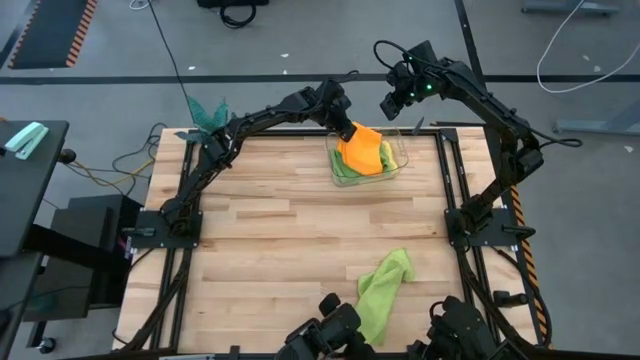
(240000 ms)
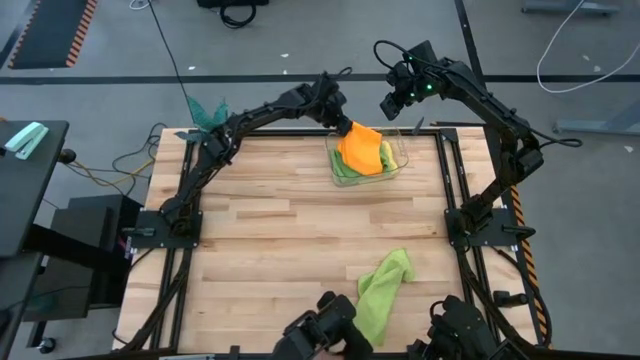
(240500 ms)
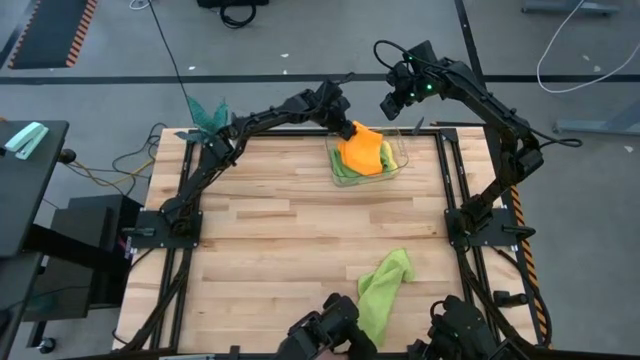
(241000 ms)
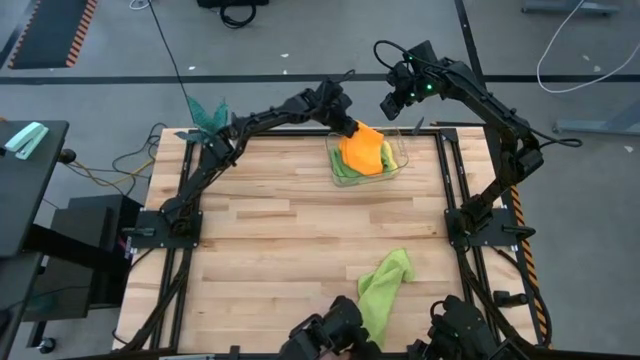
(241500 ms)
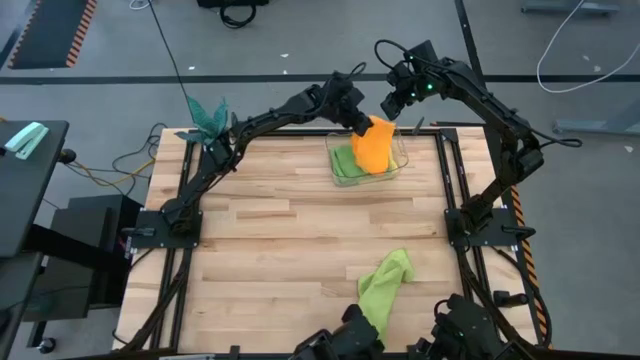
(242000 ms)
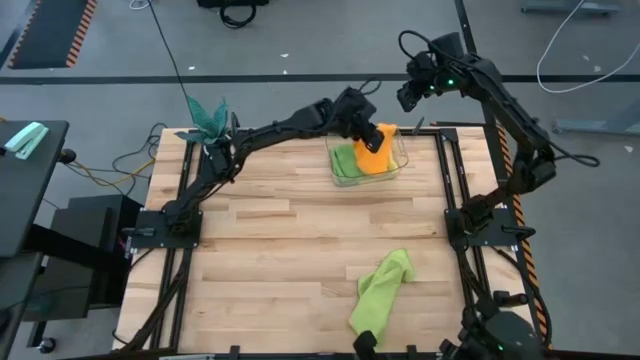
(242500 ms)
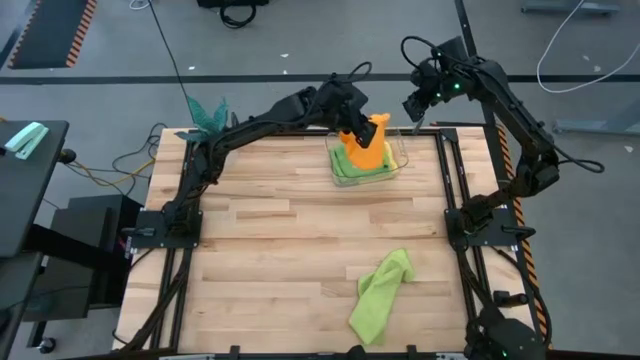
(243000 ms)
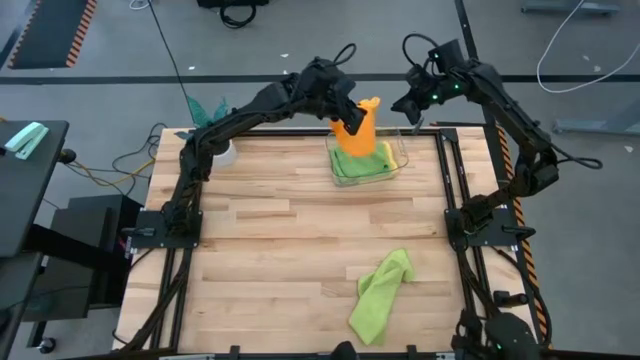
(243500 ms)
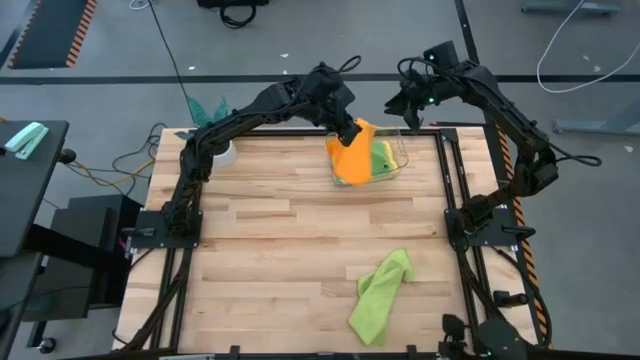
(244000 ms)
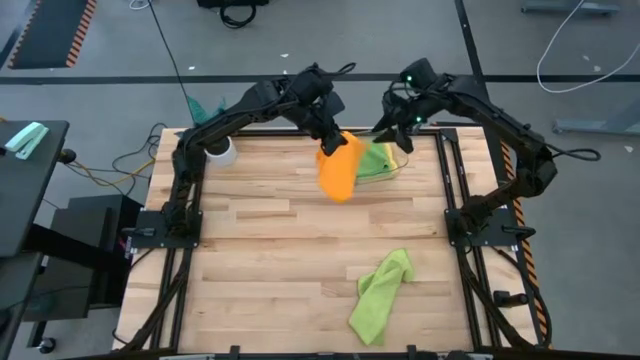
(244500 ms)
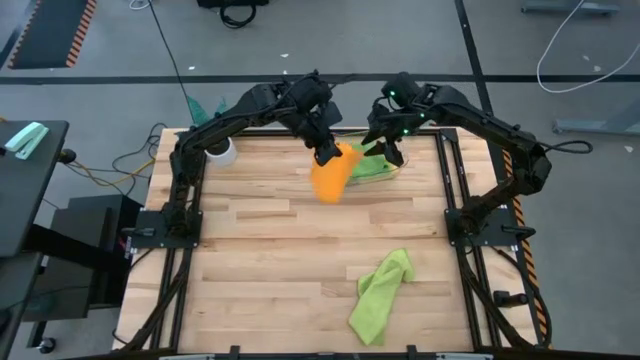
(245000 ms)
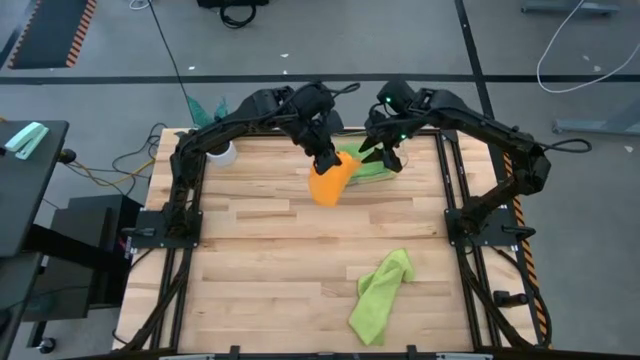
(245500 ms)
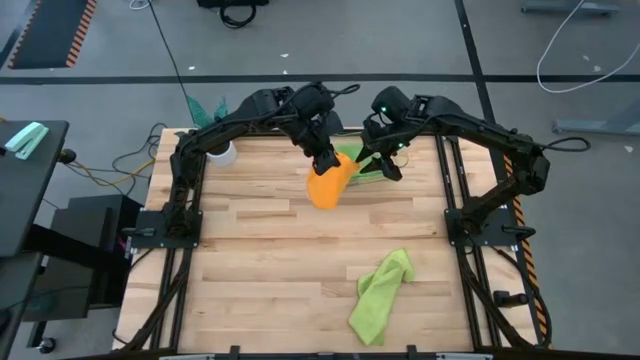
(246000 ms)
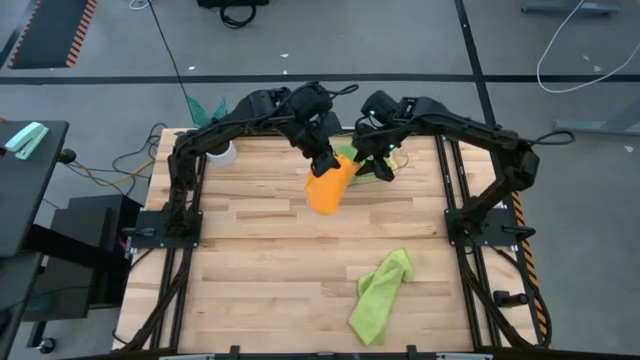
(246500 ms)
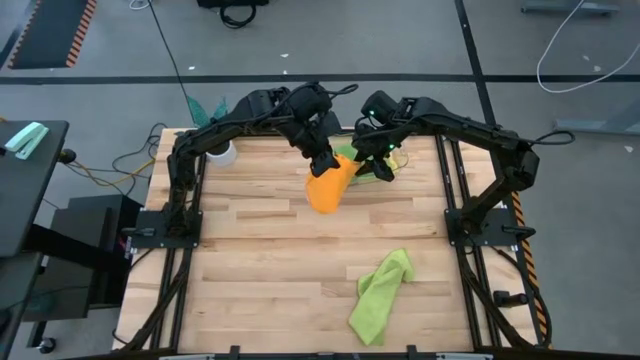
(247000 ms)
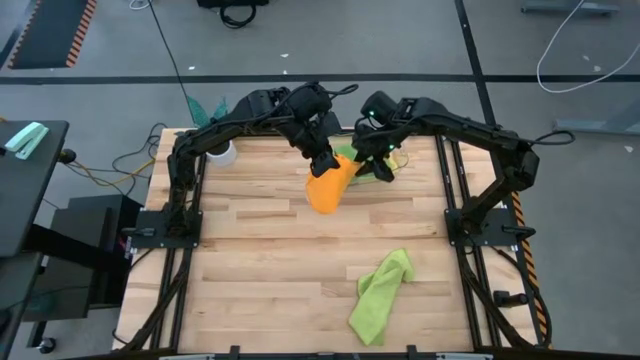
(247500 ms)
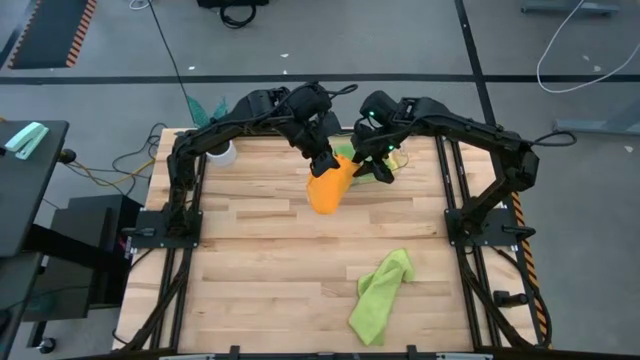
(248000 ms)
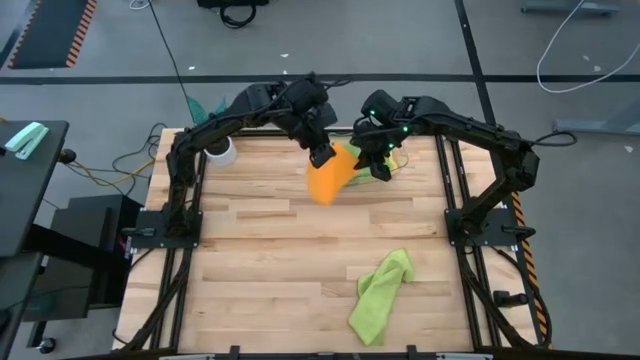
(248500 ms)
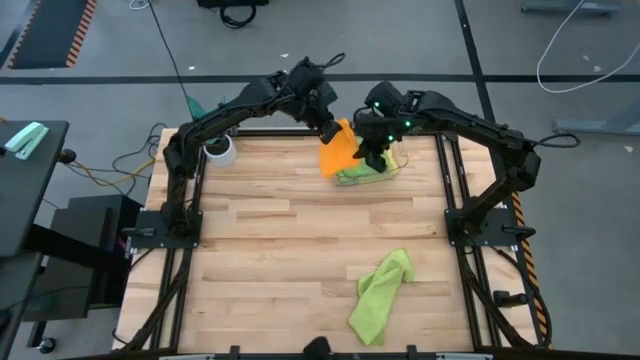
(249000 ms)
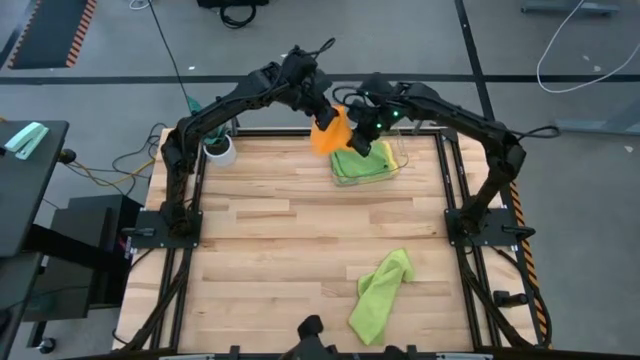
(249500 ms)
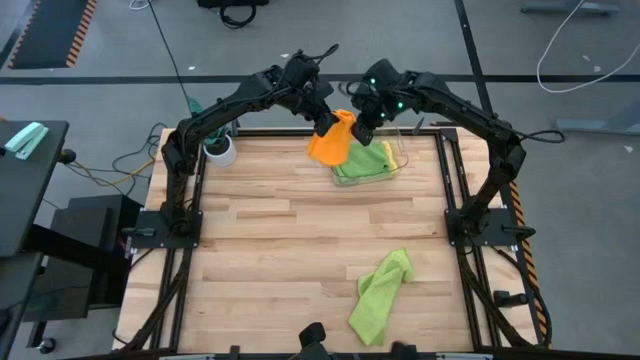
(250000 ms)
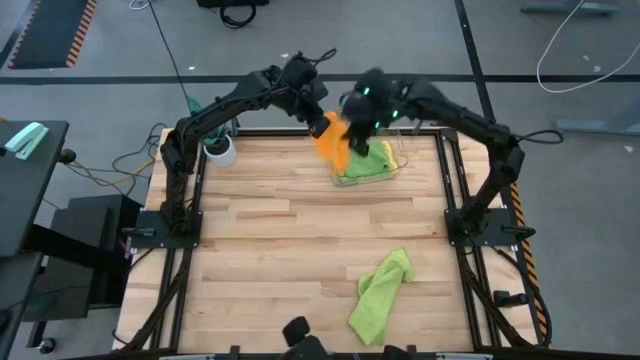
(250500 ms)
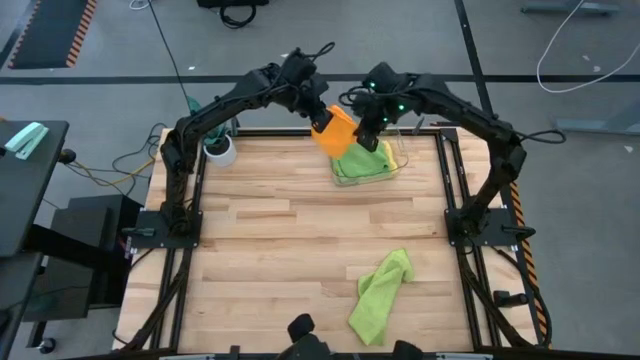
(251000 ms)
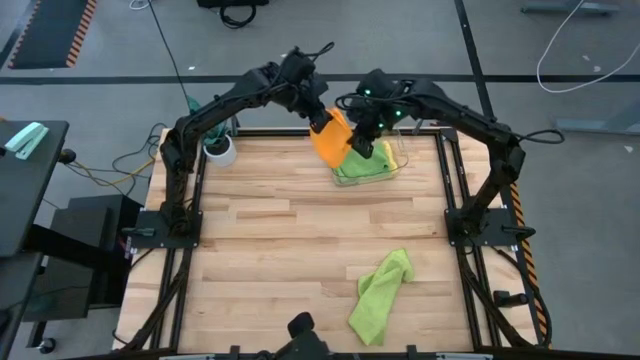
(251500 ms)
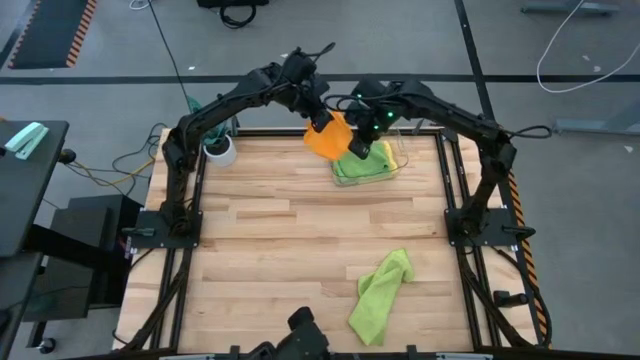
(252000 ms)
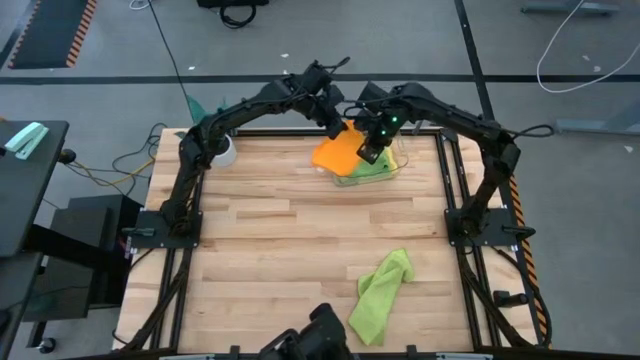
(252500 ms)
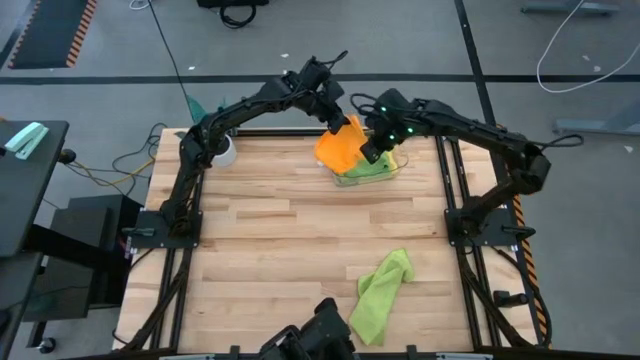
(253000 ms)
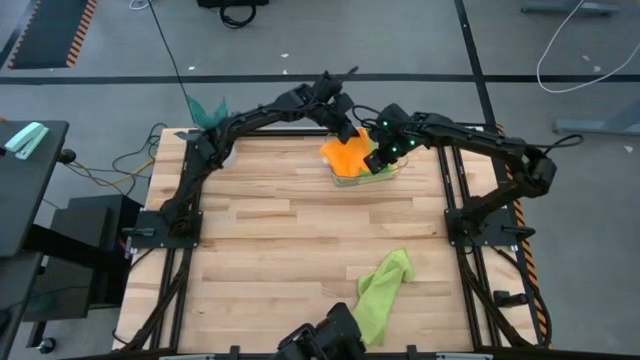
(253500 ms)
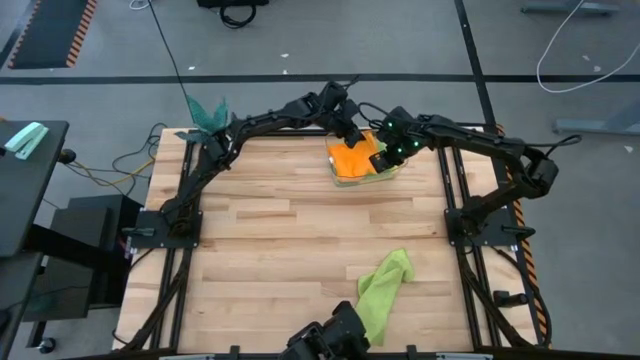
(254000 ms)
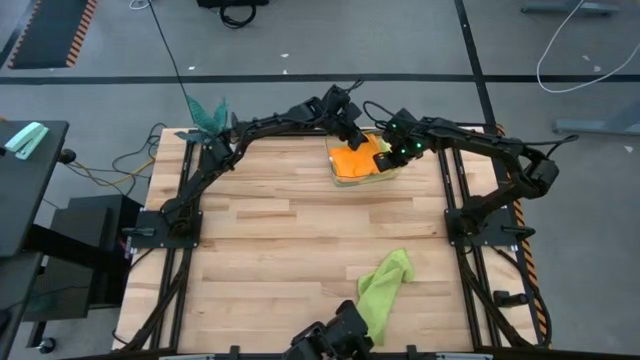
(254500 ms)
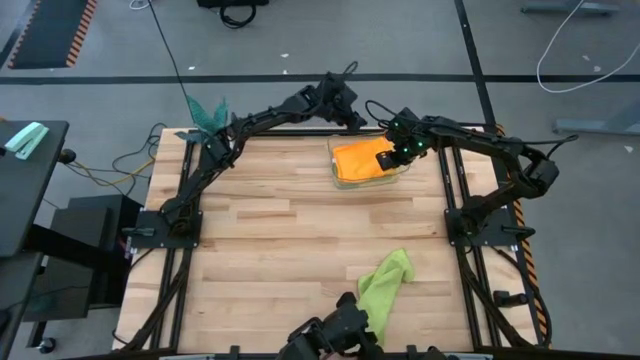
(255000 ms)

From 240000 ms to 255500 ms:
Task: Fold microfiber towels
Stack the orange towel on top of the green towel in the transparent bin

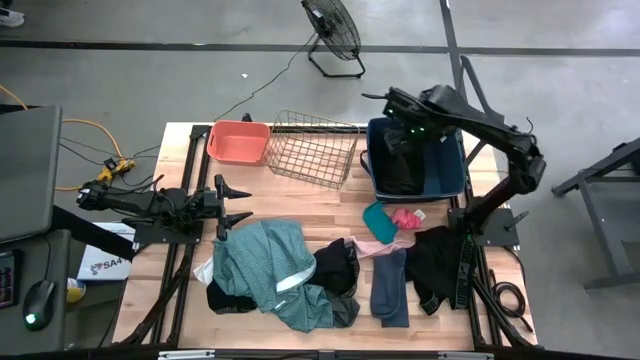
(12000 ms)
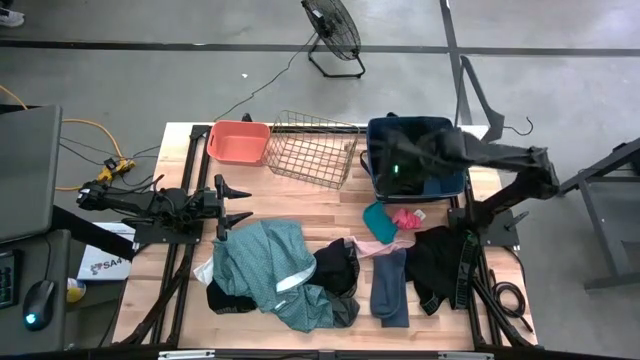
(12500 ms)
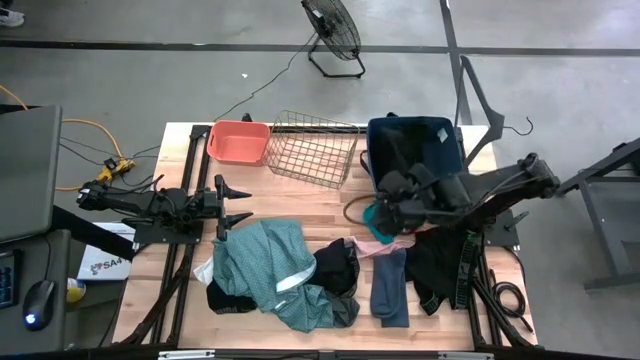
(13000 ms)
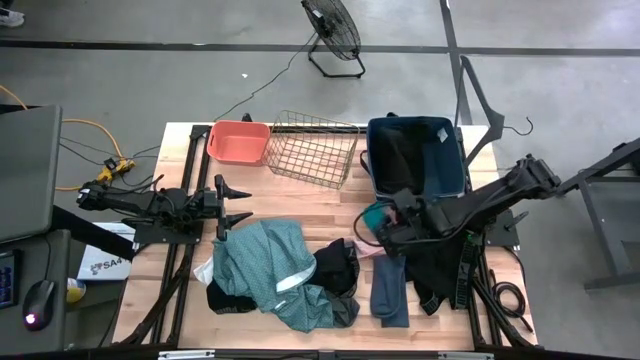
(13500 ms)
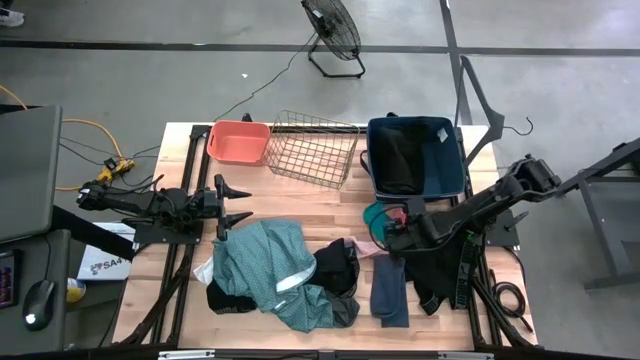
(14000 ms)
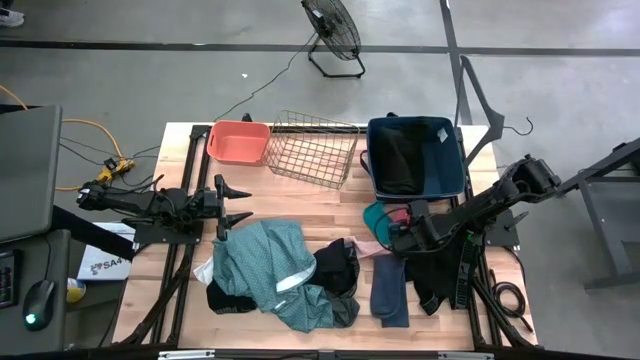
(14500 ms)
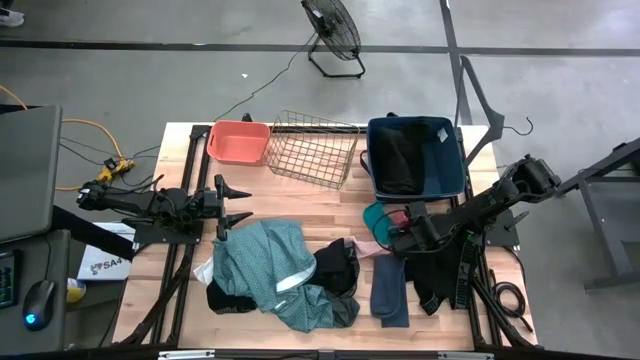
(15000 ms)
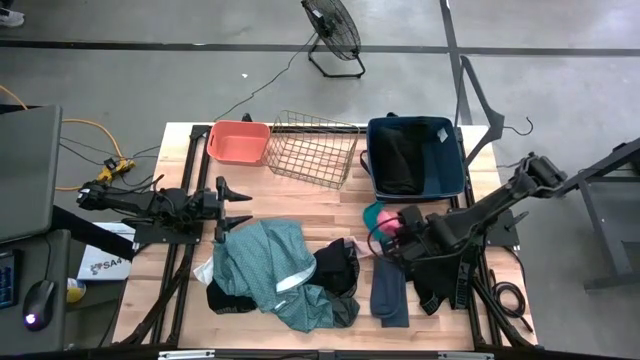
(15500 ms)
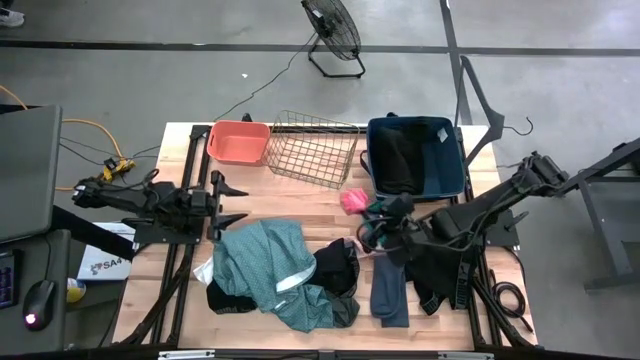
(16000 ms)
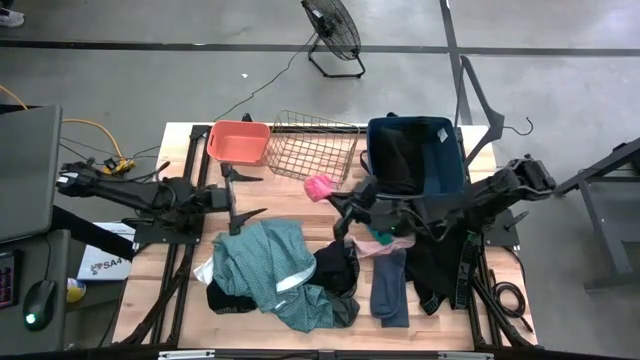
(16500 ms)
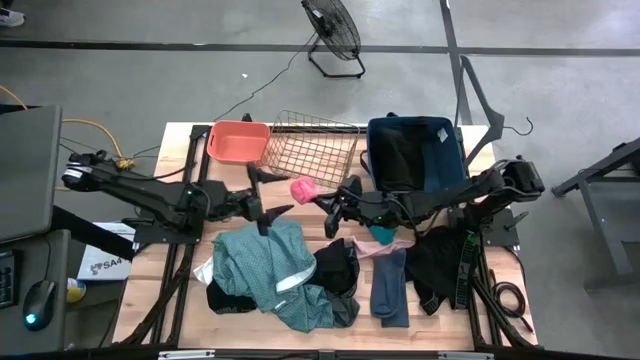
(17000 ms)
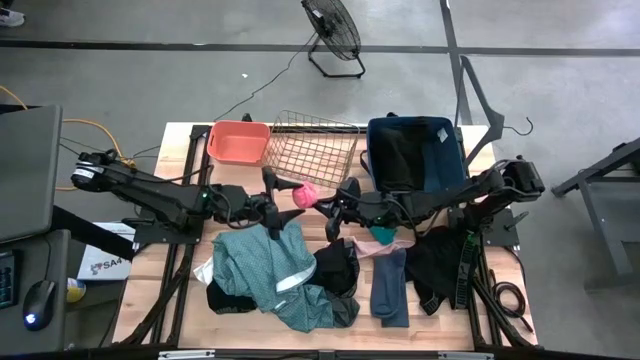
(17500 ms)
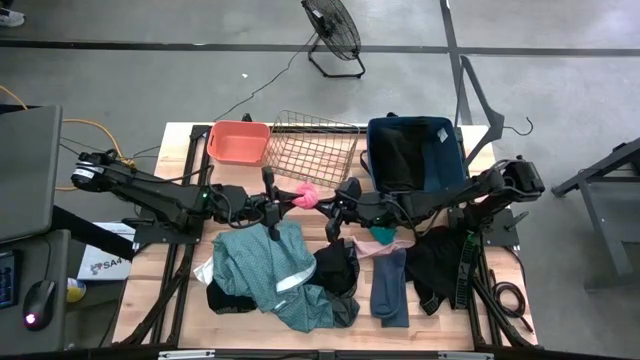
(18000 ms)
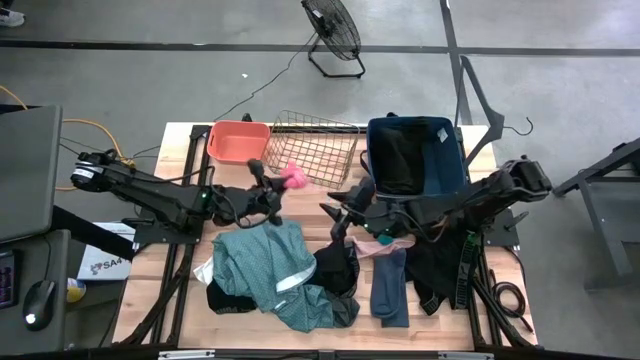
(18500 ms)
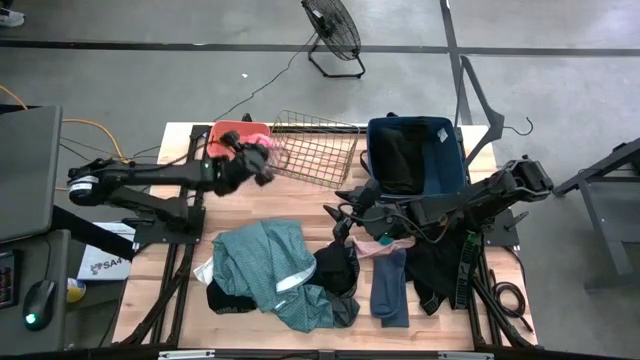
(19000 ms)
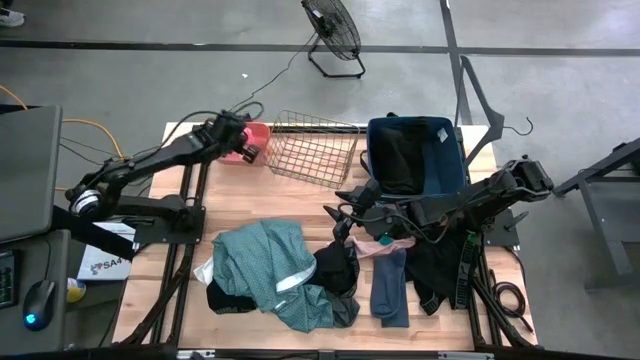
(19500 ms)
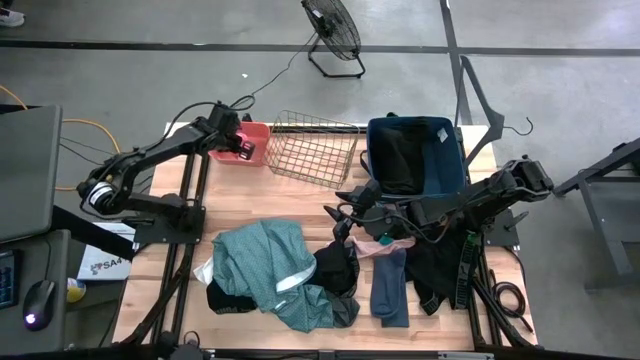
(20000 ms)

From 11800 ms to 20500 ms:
Task: Pick & Place Cloths
Put the pink sock into the orange bin
